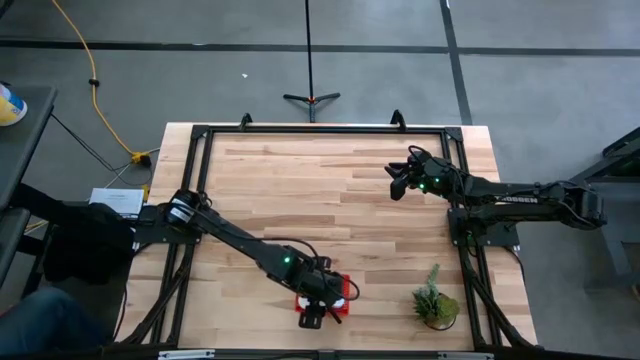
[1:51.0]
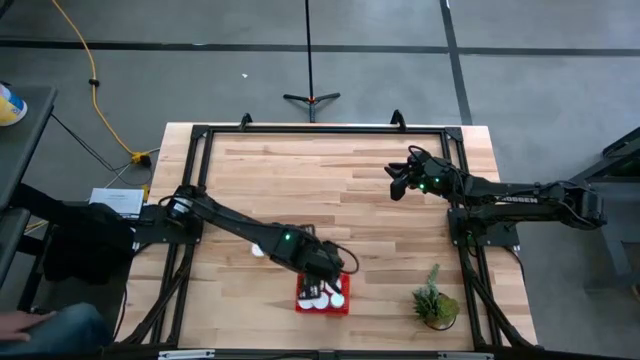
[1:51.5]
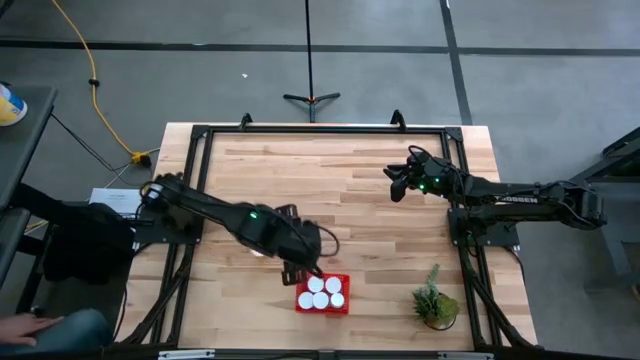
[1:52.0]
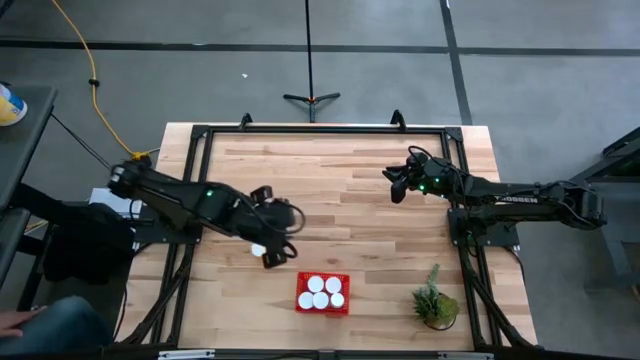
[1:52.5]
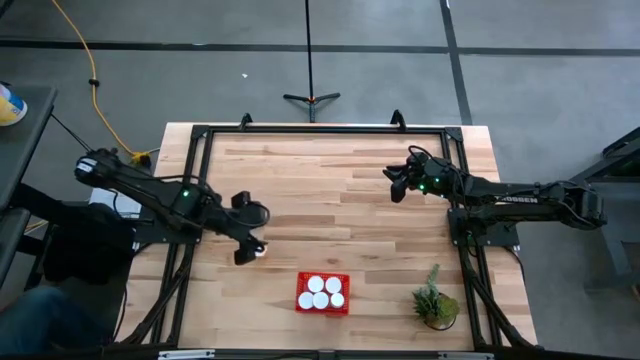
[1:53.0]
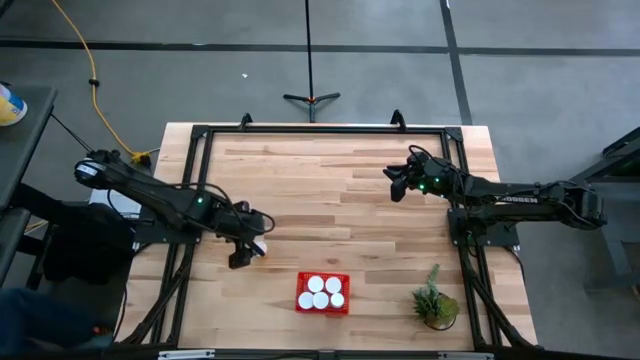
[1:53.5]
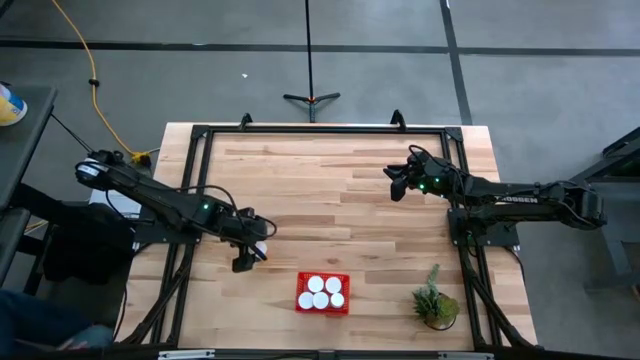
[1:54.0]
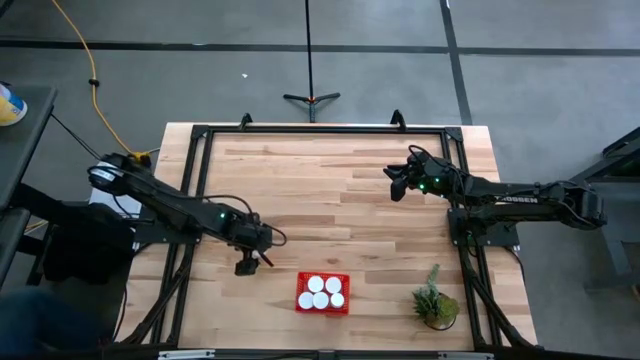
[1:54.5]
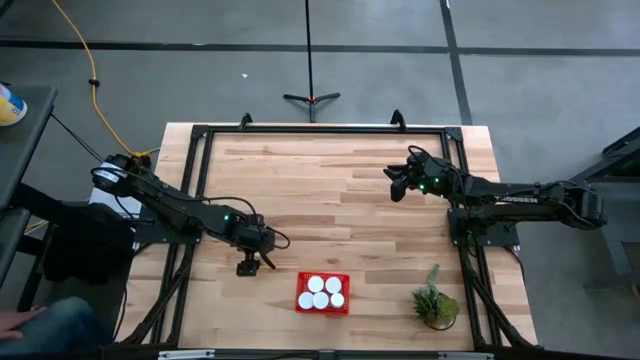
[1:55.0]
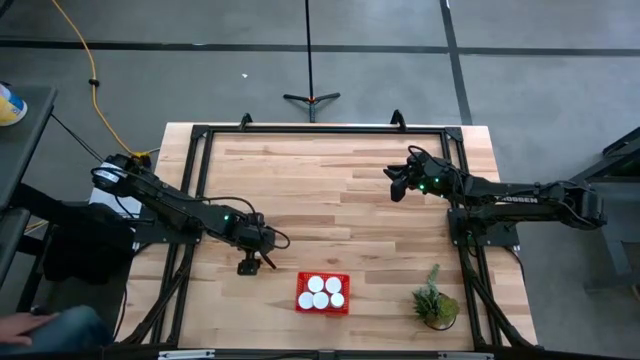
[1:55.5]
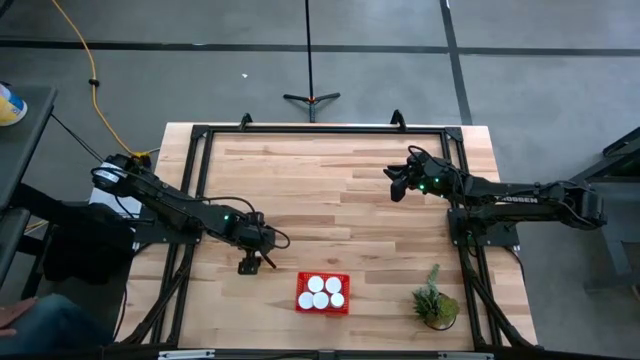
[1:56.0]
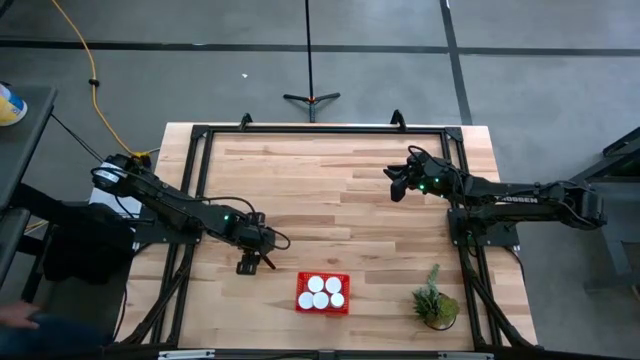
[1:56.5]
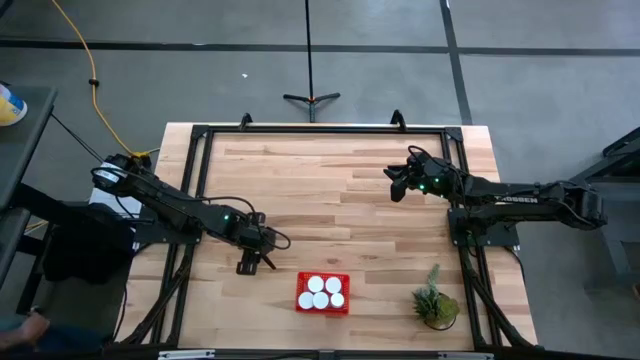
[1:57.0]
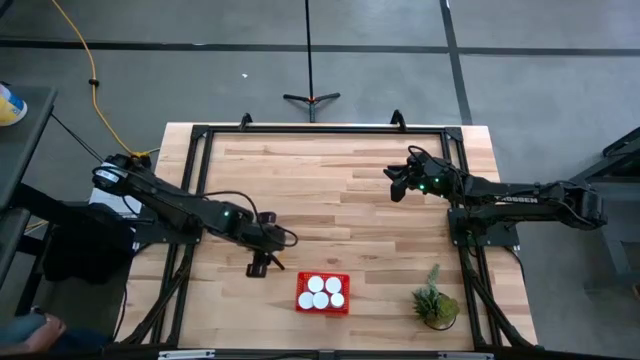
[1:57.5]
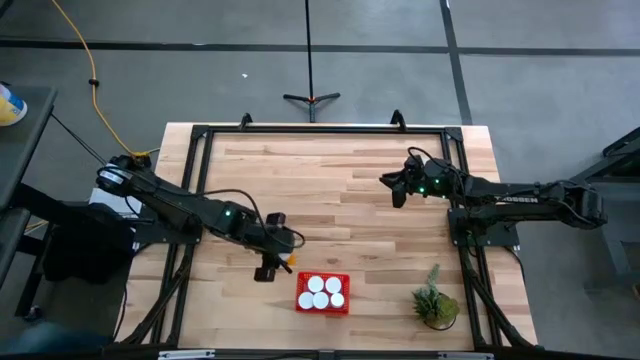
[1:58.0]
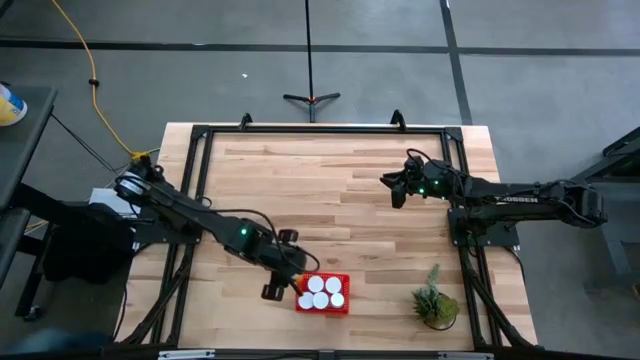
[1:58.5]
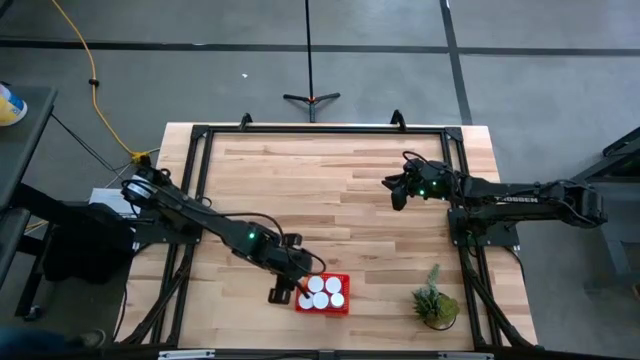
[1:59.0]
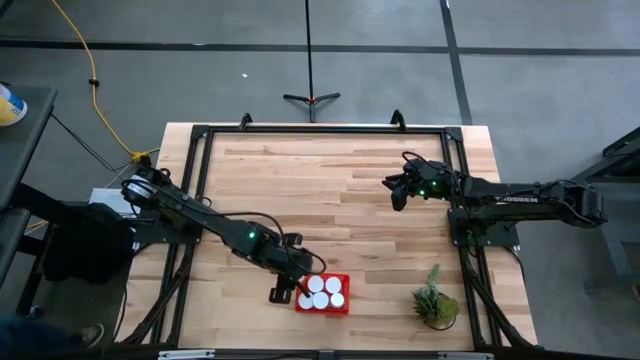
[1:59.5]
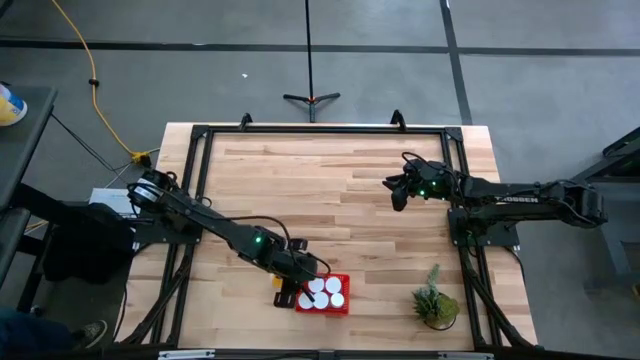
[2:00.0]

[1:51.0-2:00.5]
Task: Pick and place pill bottles into a basket
Put the orange pill bottle into the red basket

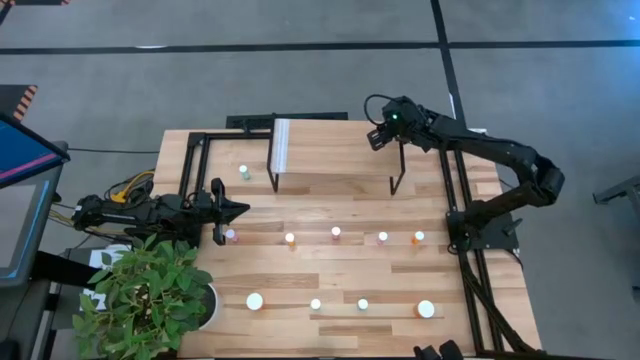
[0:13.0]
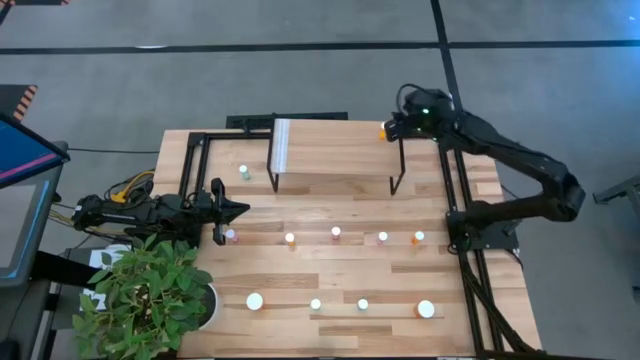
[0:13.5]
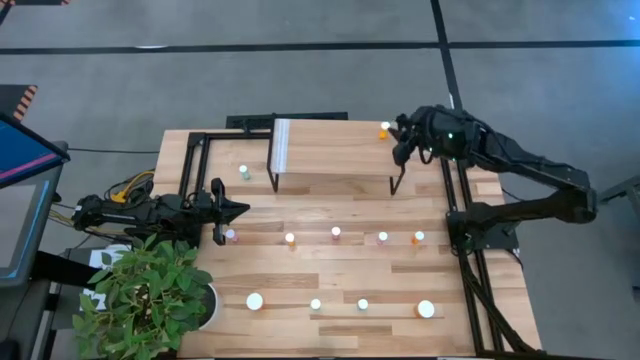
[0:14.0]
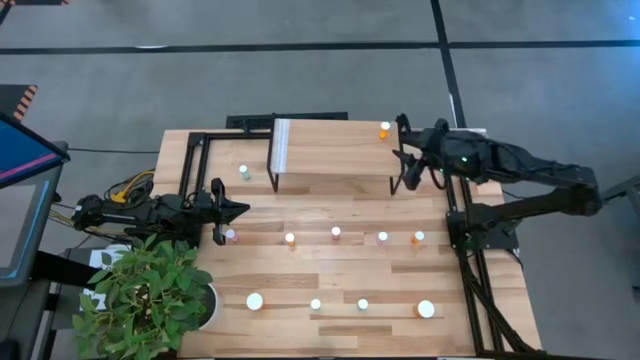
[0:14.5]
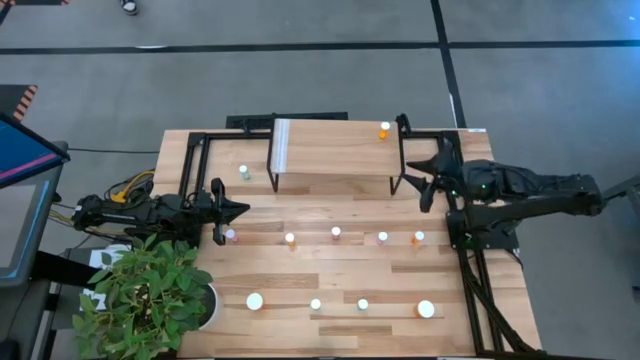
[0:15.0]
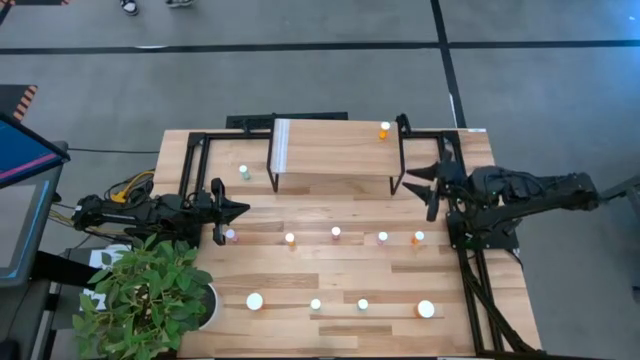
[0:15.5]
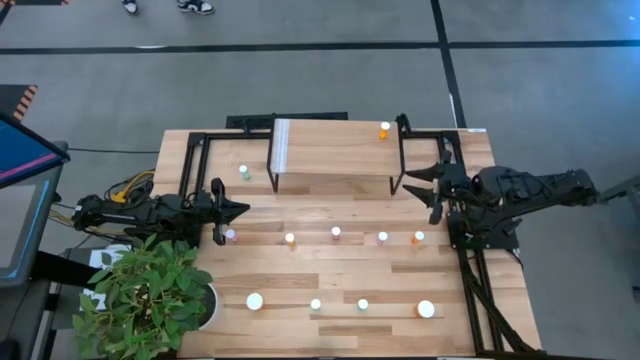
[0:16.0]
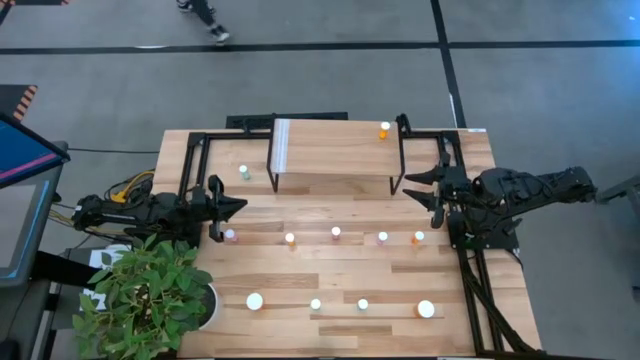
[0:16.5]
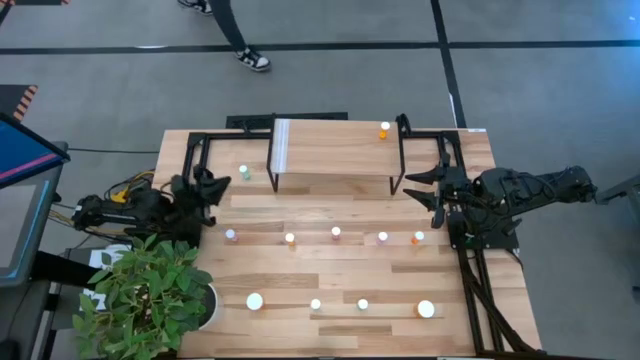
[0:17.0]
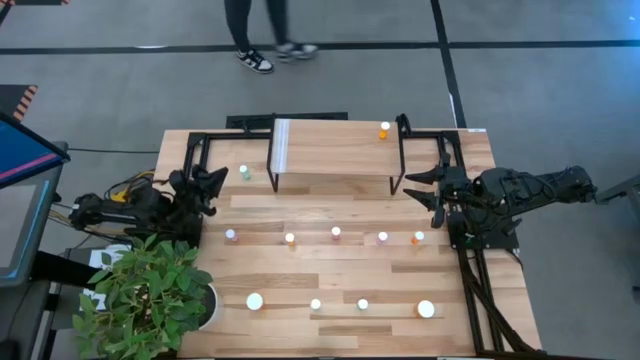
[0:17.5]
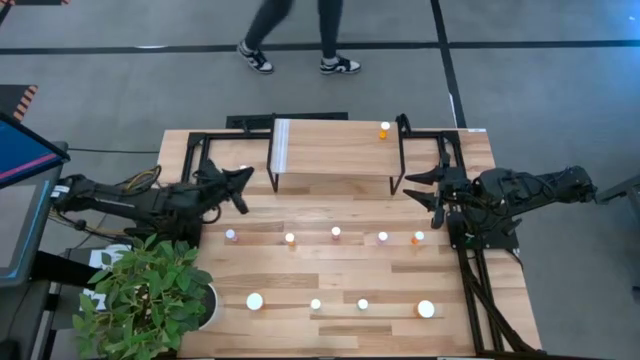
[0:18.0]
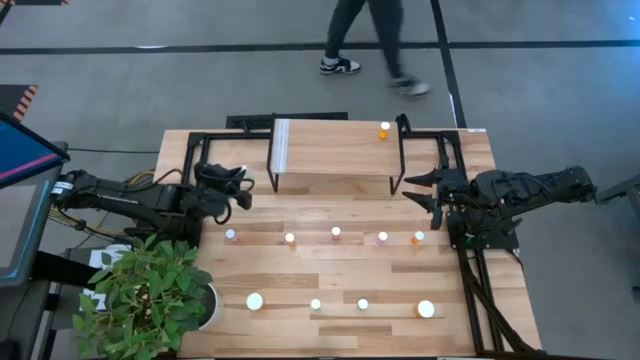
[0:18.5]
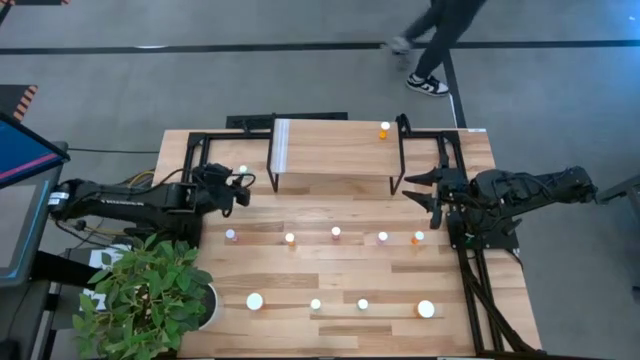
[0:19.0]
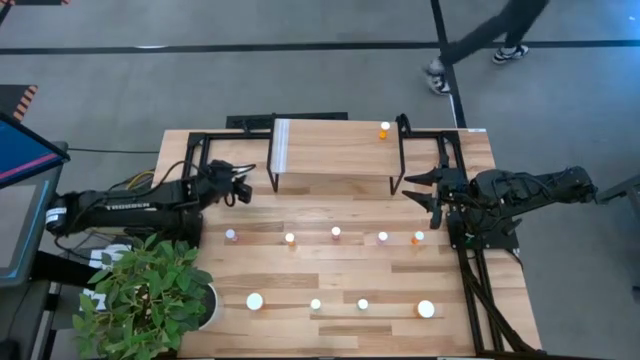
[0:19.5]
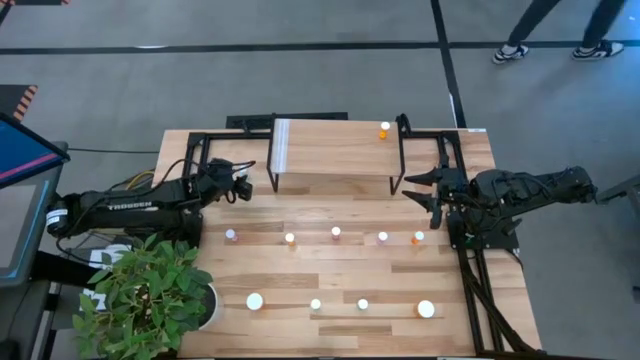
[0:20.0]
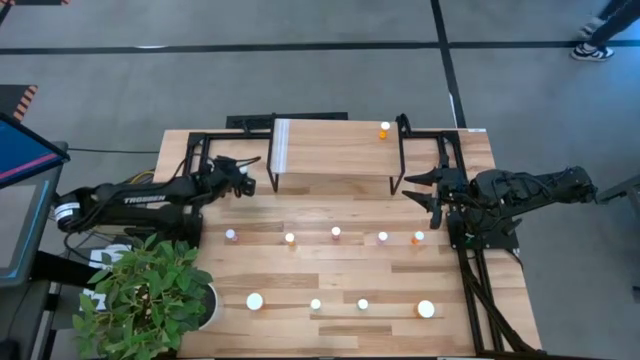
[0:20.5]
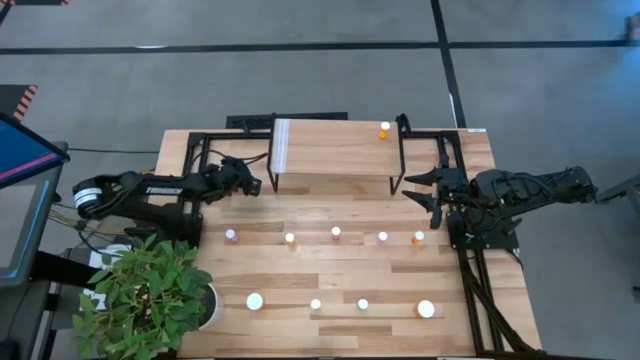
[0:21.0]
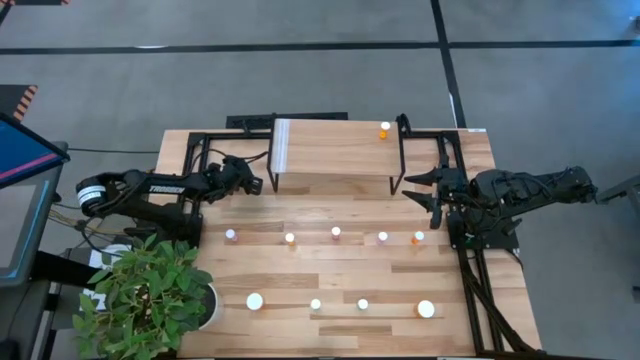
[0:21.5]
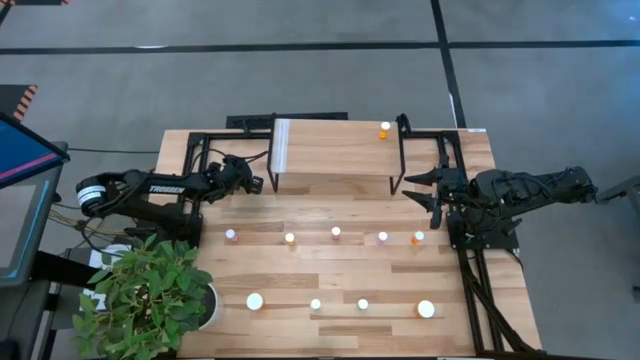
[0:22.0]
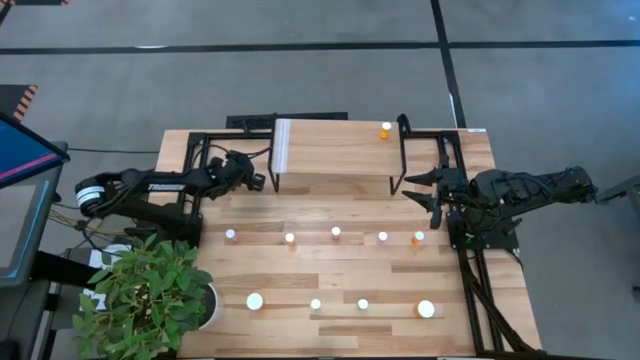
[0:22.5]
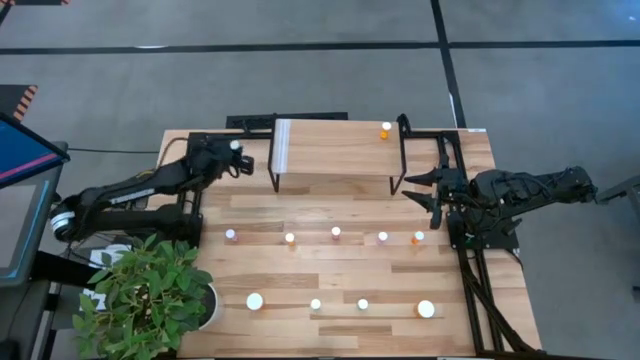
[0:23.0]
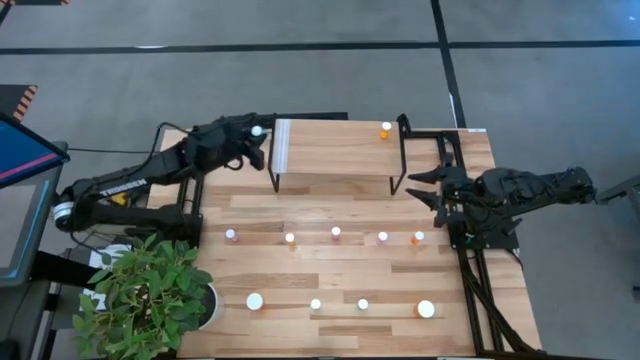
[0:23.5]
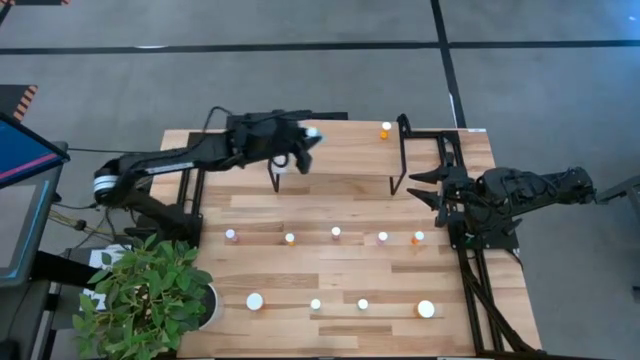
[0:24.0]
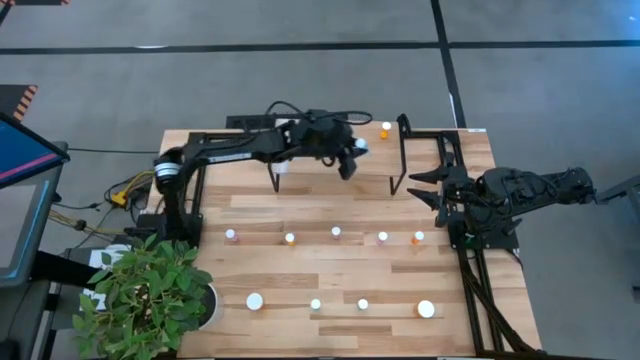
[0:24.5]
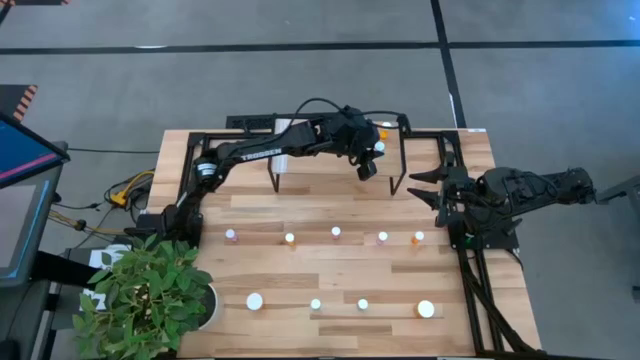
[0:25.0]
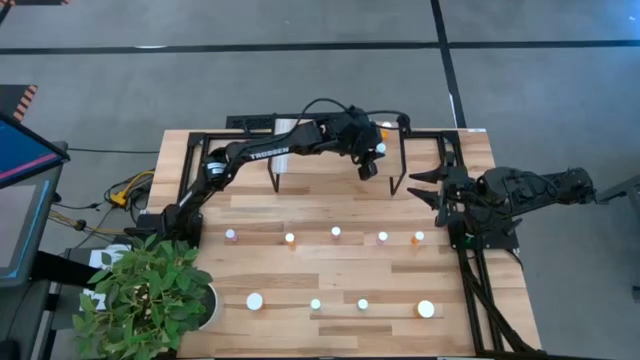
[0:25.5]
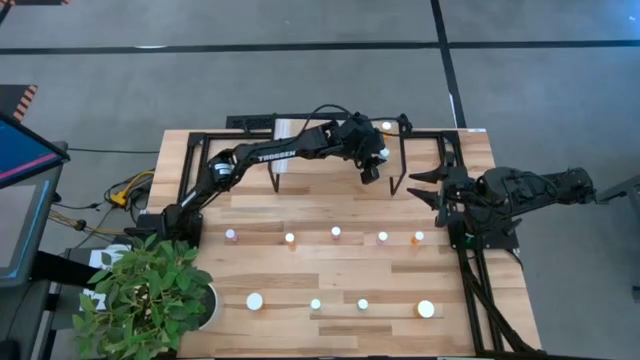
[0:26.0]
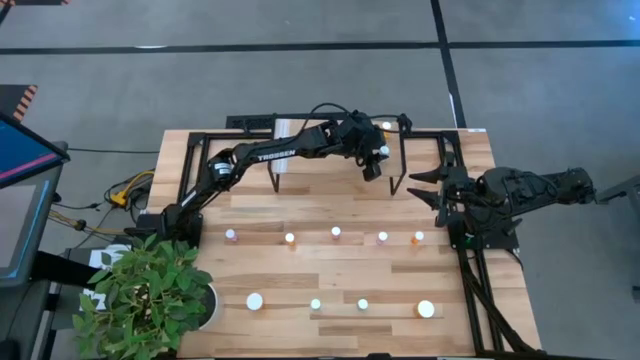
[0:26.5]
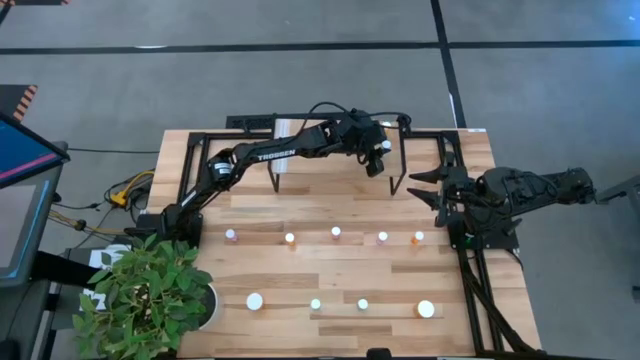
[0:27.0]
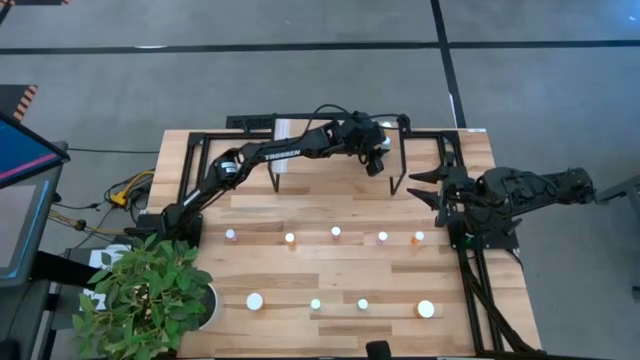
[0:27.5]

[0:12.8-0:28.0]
Task: Pick and place medicine bottles onto shelf by color
Put the top left green pill bottle on the shelf
